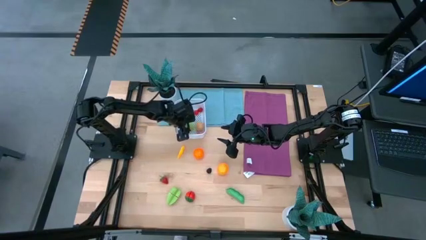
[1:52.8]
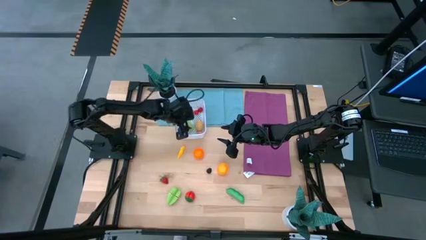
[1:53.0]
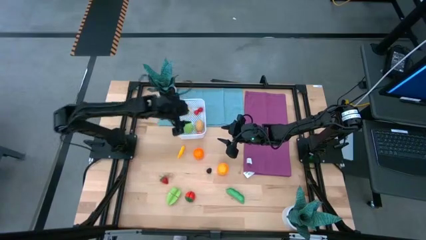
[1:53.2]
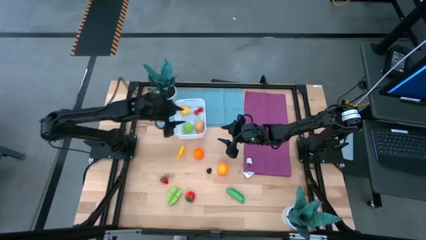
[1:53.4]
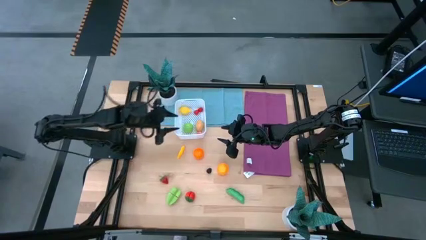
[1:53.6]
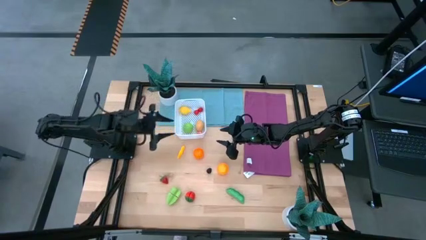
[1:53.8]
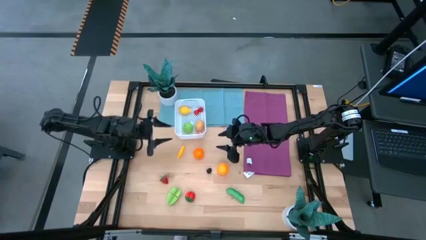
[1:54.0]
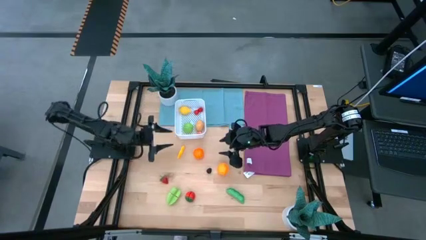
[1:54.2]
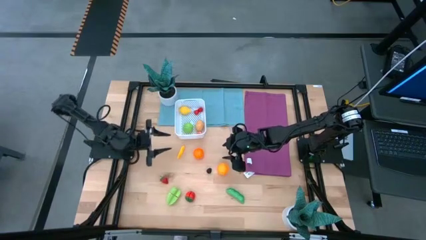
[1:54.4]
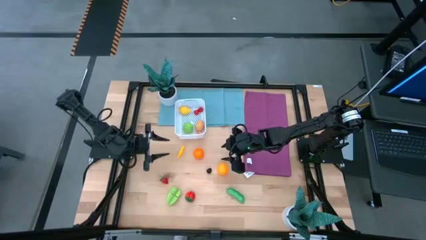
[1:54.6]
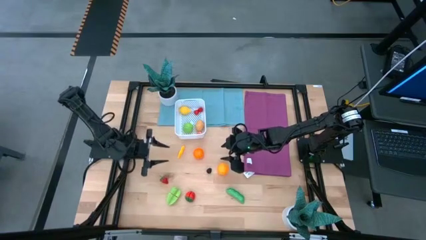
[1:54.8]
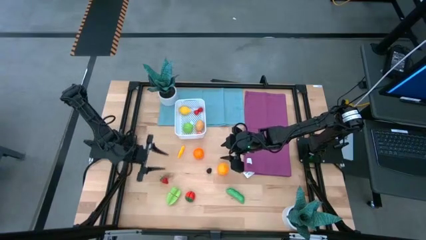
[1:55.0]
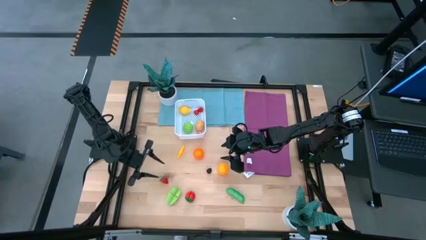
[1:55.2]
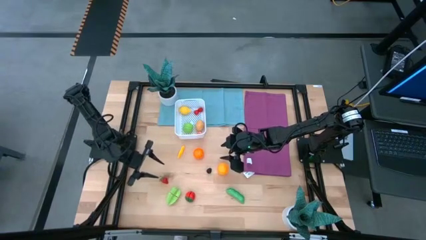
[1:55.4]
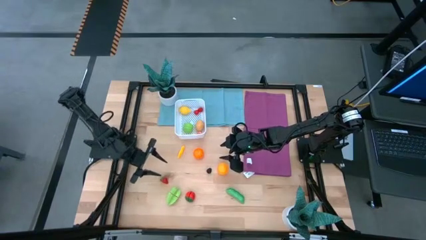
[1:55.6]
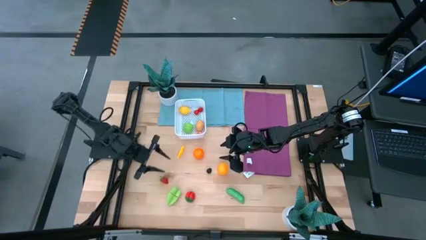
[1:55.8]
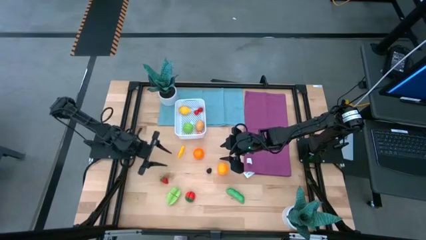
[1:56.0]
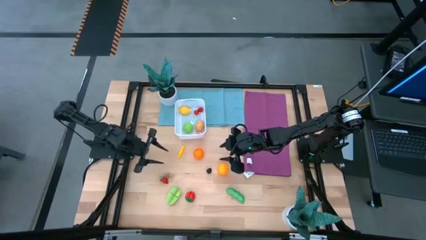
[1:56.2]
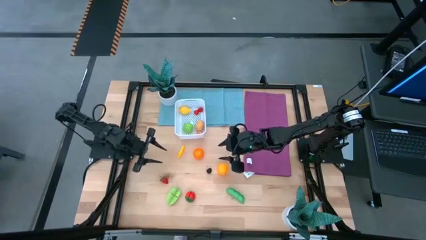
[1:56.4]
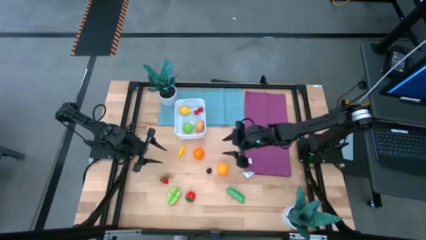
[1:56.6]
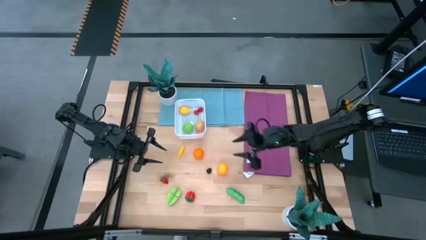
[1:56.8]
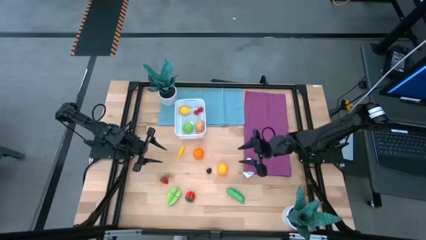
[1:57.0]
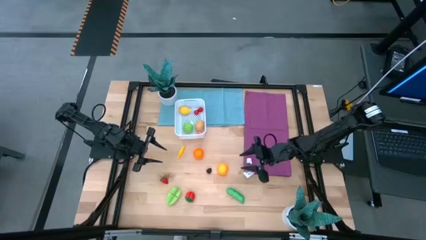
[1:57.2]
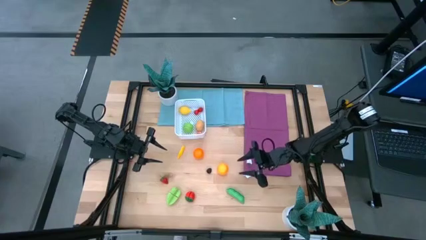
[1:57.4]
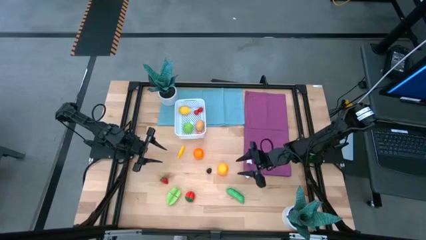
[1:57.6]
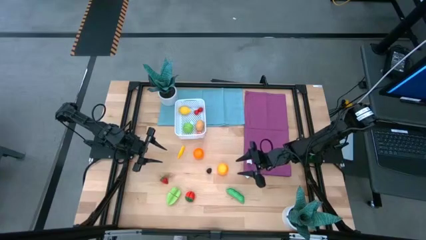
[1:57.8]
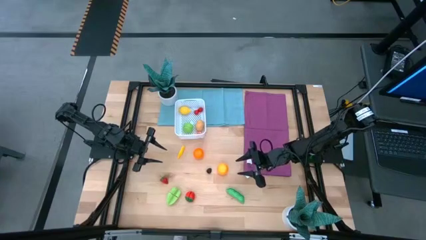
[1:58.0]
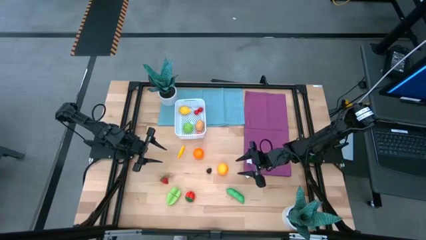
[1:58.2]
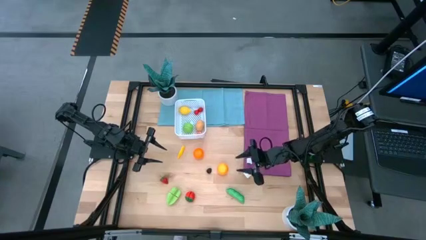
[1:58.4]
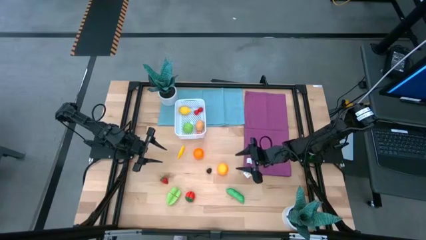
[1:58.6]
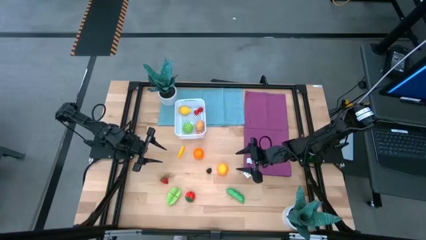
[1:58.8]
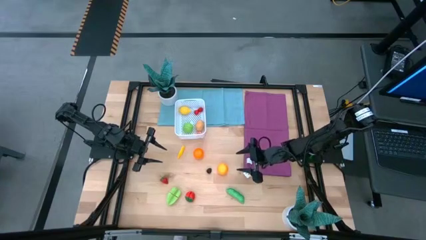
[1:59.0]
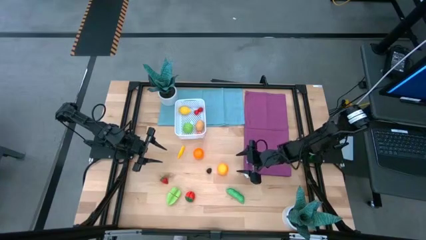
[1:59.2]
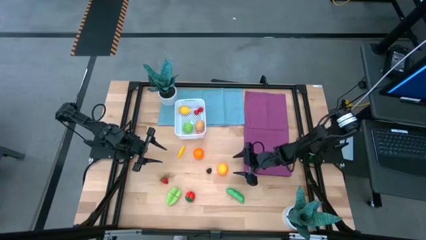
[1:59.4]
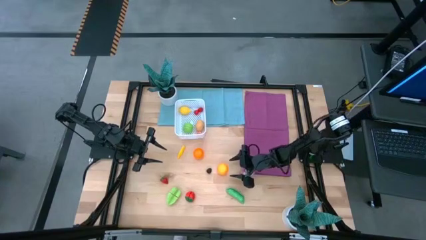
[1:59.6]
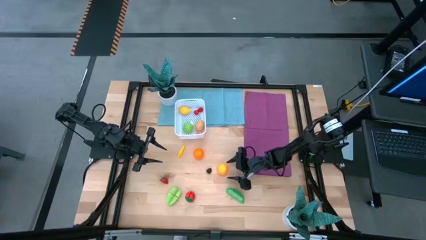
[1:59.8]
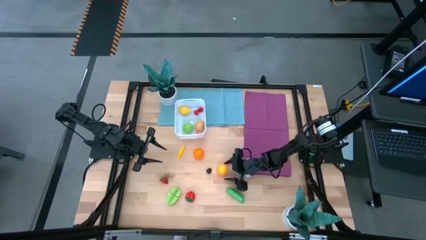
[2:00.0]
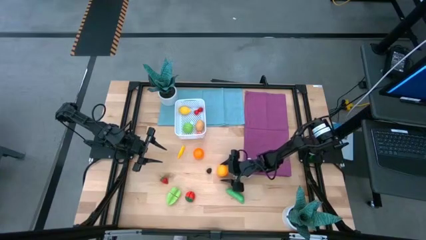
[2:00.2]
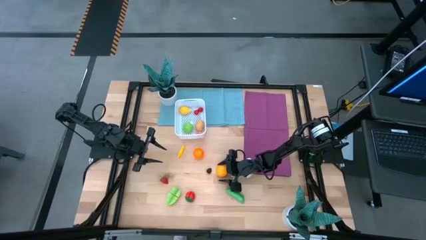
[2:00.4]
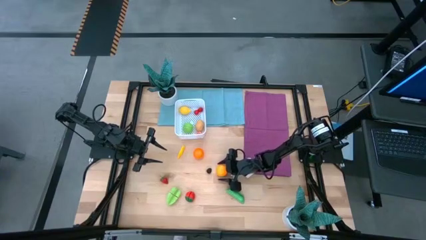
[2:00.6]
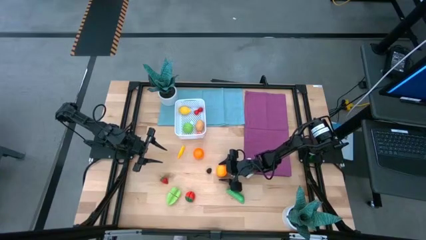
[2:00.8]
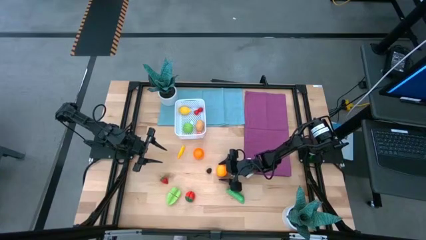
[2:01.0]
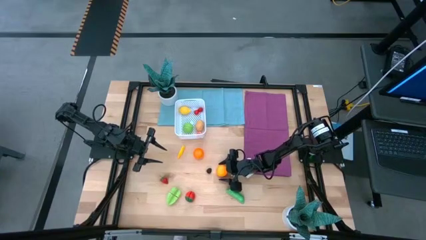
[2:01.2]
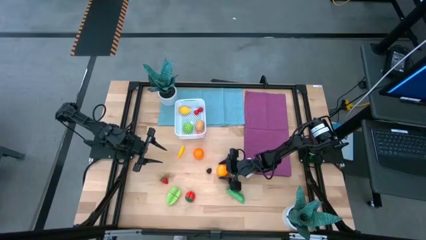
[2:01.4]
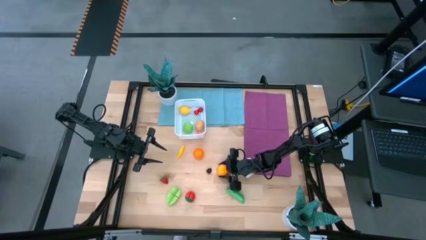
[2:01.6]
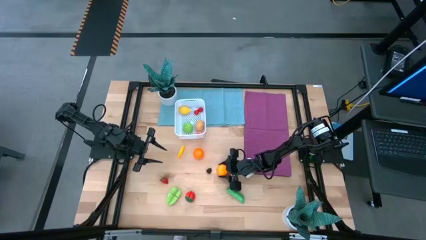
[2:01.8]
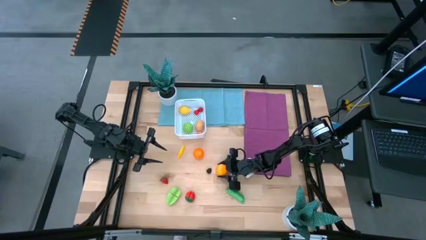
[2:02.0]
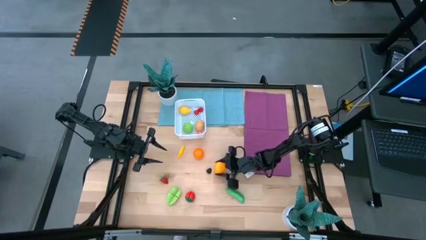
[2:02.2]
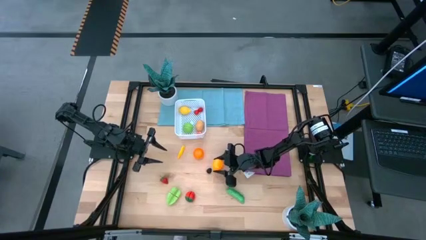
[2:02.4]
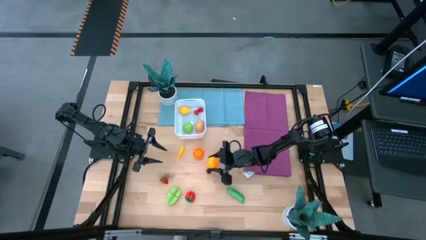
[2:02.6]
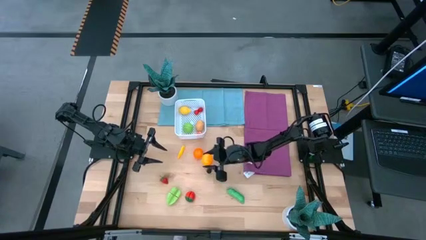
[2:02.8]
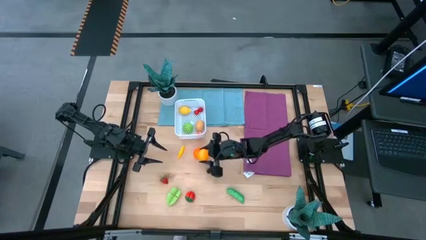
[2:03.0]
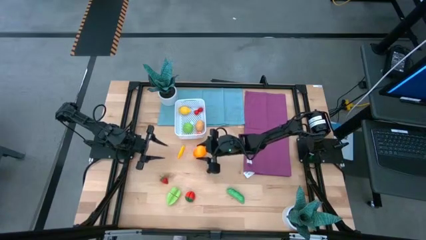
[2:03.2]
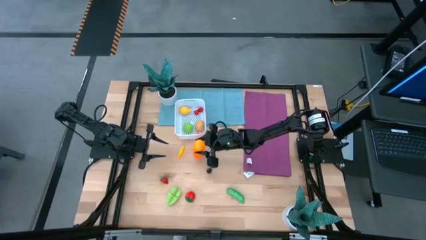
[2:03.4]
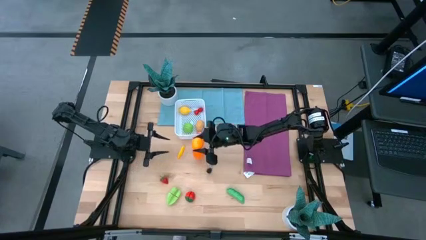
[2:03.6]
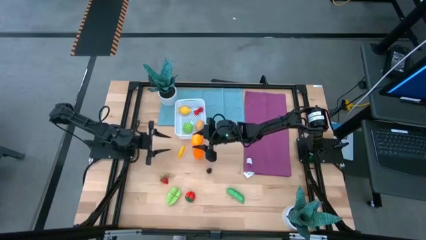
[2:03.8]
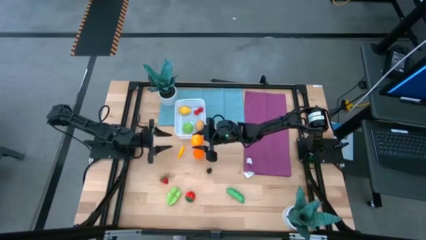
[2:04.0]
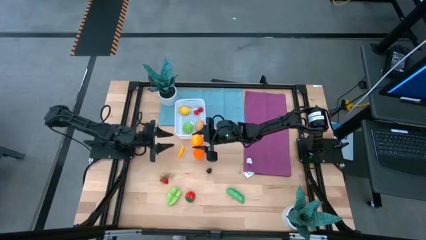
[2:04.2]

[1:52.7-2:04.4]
Task: Pick and placing Produce into tupperware
Put the orange into the white basket

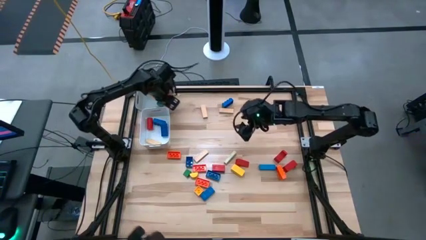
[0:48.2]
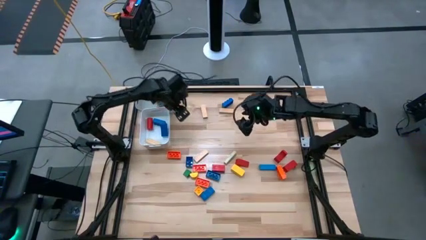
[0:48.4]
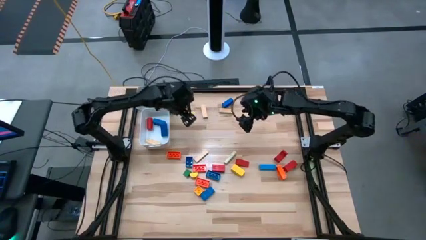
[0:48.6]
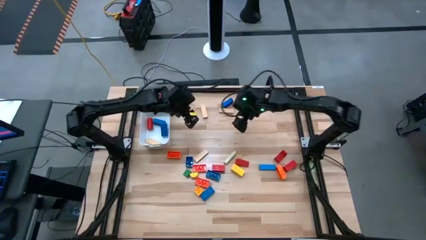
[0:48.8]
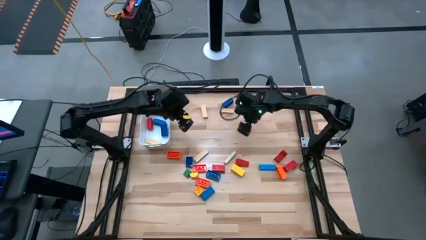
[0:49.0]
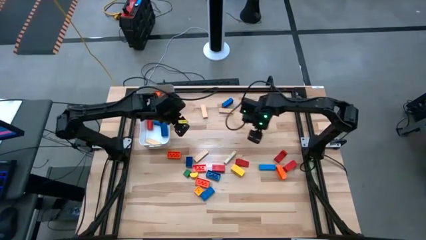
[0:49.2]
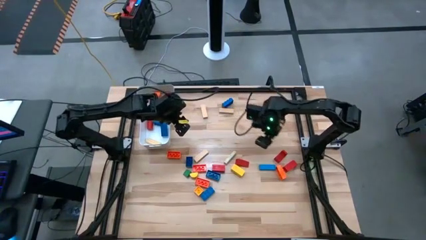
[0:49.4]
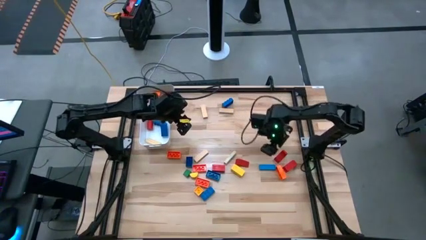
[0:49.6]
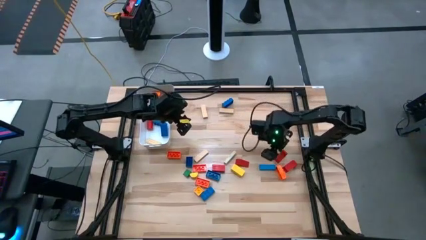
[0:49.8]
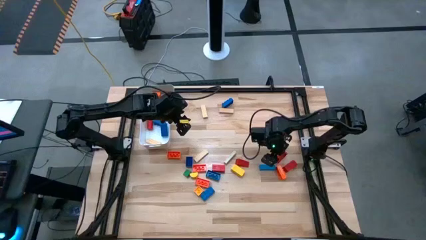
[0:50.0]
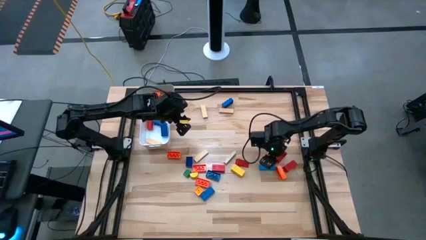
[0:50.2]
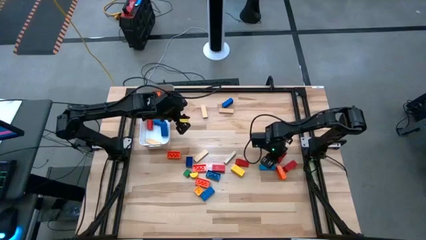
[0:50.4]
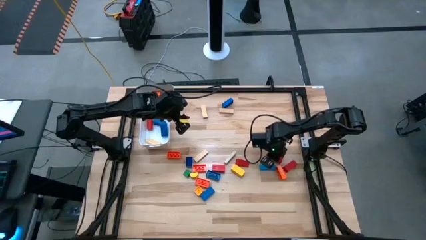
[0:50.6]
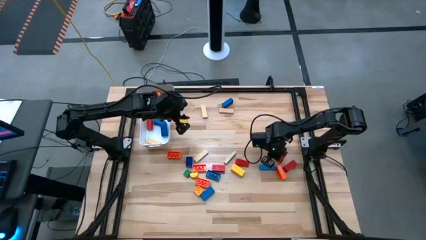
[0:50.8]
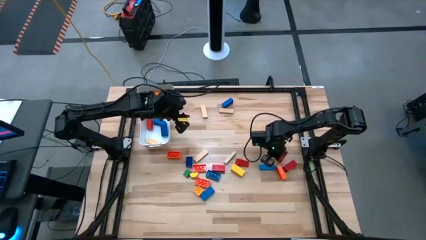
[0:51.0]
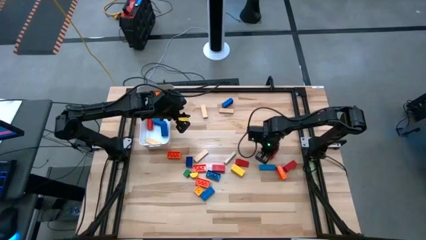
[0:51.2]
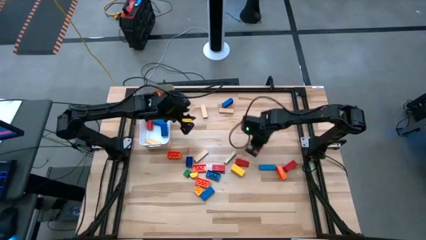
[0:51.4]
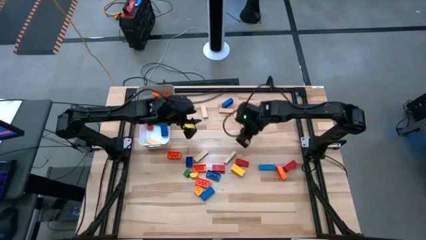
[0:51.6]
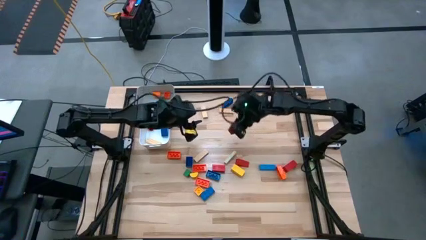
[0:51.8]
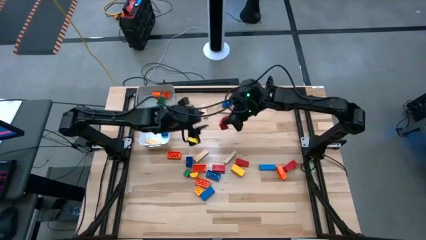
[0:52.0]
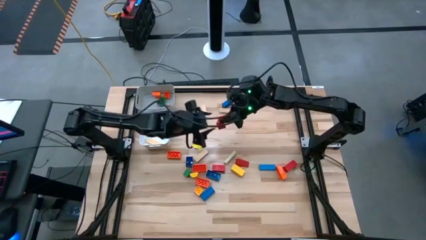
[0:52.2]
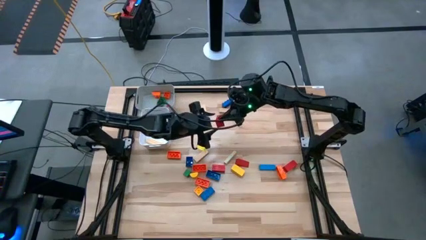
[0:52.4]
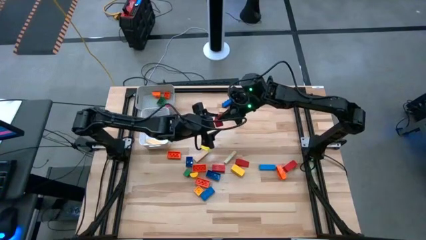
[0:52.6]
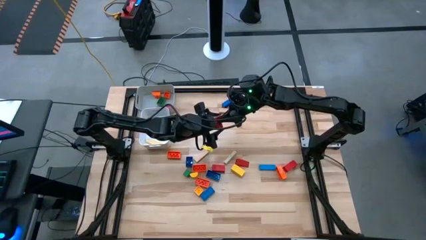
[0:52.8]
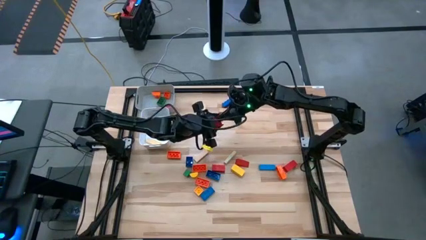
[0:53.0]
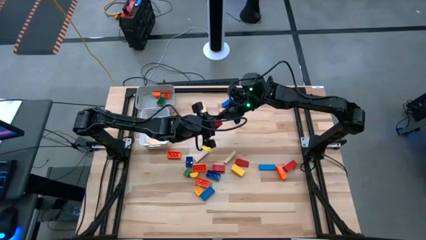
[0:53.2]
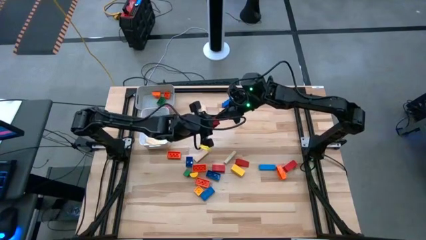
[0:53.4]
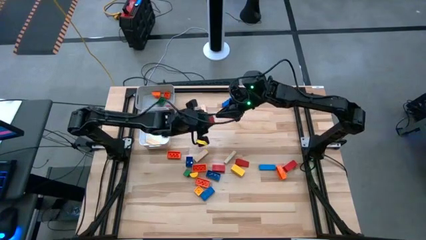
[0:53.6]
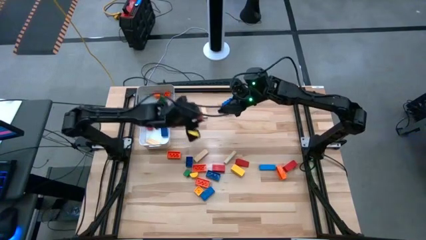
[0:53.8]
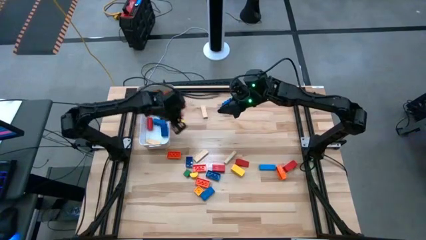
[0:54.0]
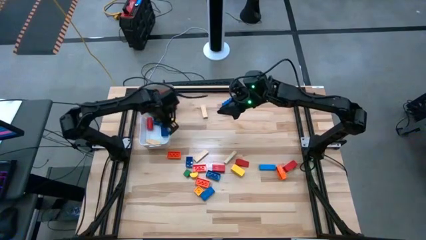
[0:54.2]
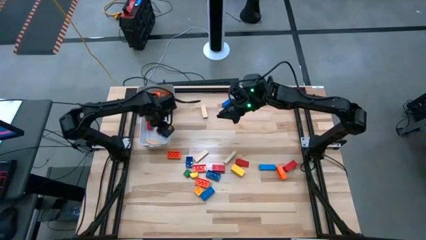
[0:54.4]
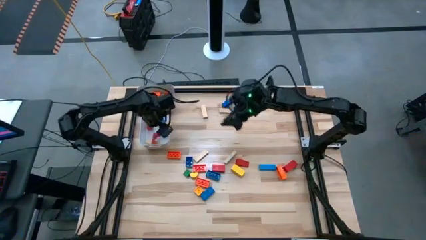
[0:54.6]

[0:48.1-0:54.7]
Task: Sort blocks by size
Put the large red wooden block into the white bin
